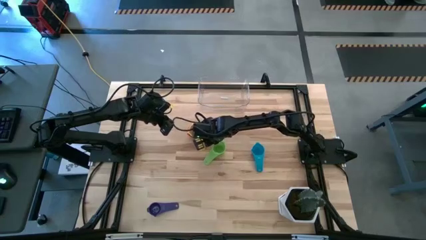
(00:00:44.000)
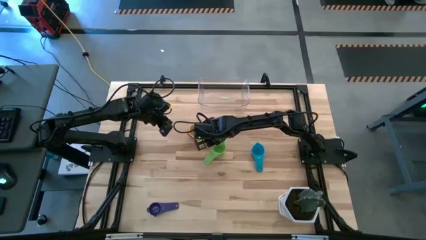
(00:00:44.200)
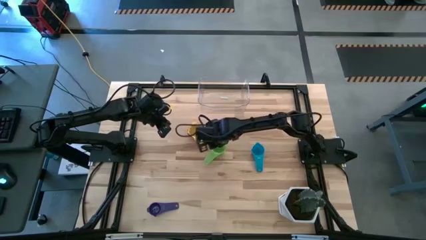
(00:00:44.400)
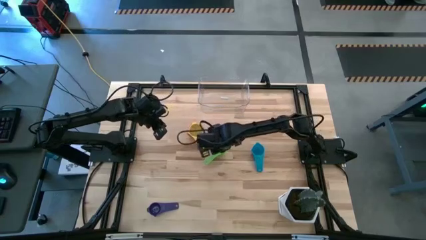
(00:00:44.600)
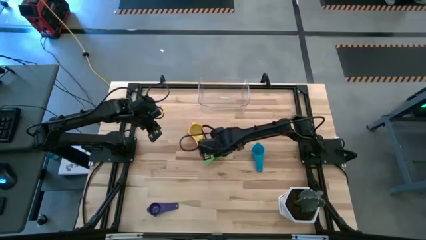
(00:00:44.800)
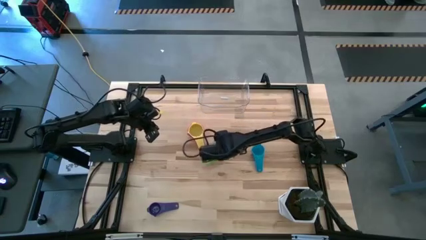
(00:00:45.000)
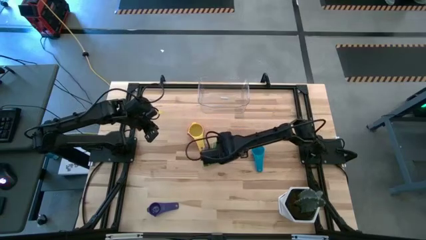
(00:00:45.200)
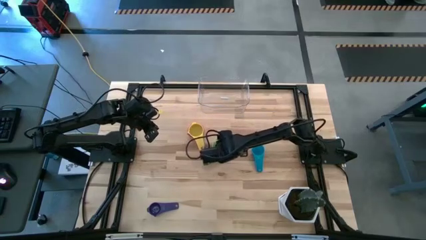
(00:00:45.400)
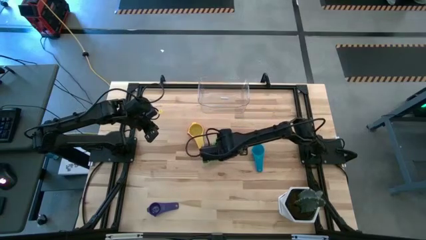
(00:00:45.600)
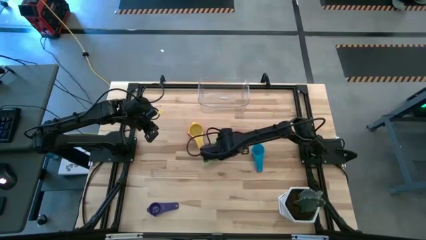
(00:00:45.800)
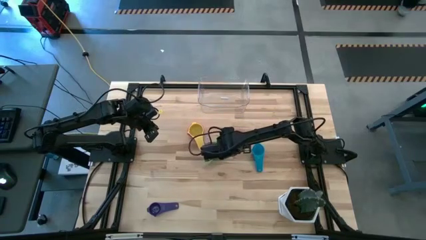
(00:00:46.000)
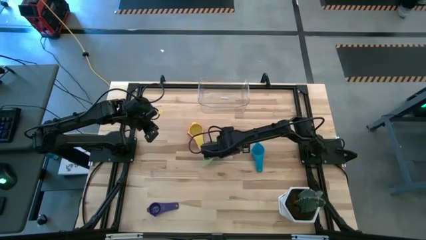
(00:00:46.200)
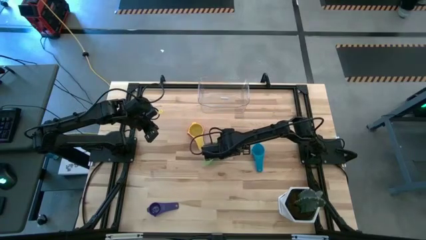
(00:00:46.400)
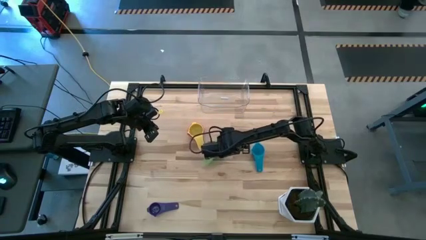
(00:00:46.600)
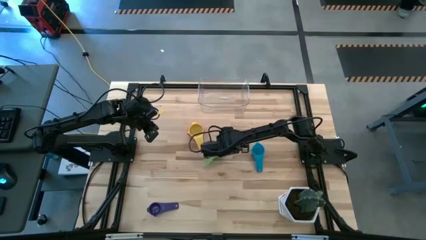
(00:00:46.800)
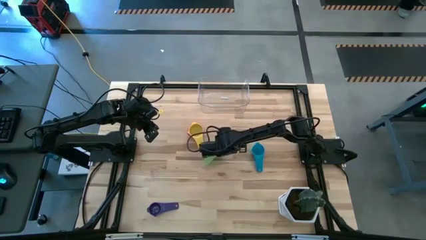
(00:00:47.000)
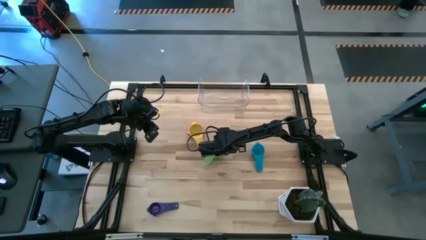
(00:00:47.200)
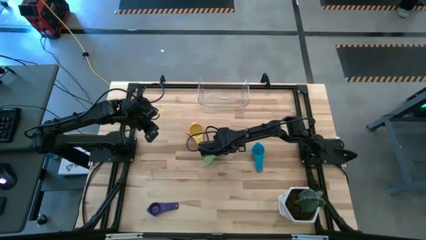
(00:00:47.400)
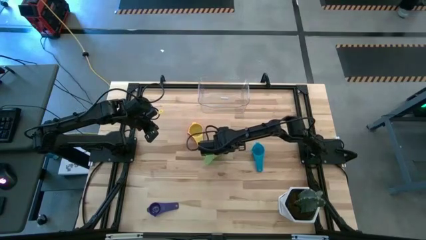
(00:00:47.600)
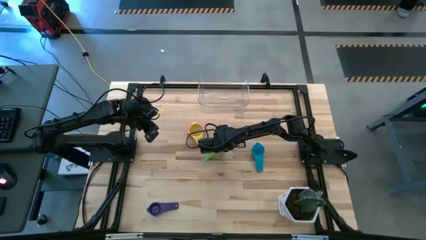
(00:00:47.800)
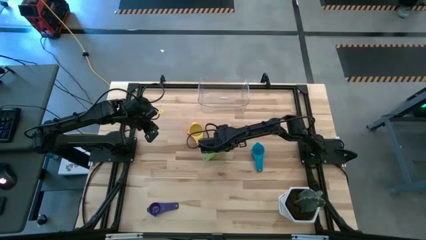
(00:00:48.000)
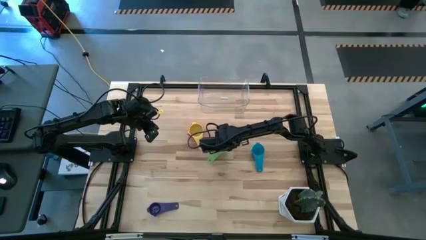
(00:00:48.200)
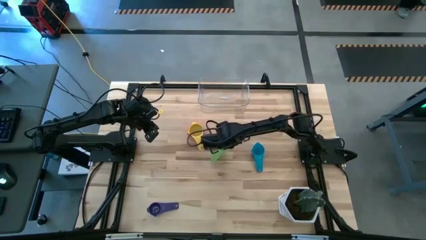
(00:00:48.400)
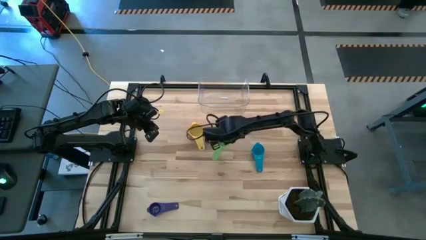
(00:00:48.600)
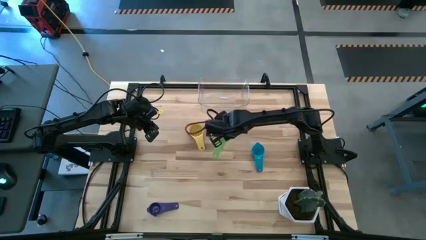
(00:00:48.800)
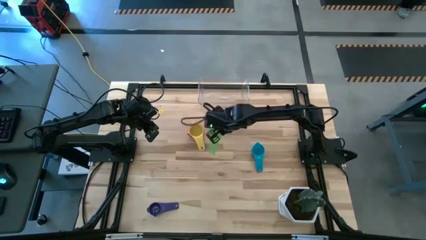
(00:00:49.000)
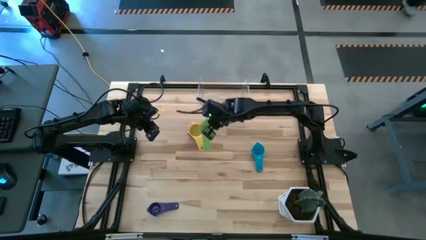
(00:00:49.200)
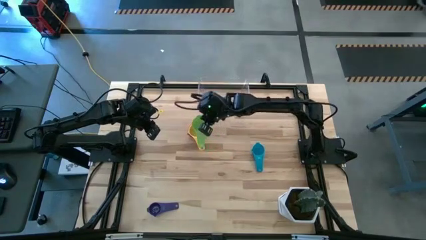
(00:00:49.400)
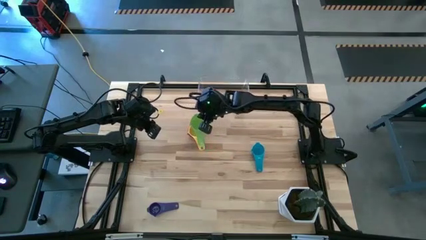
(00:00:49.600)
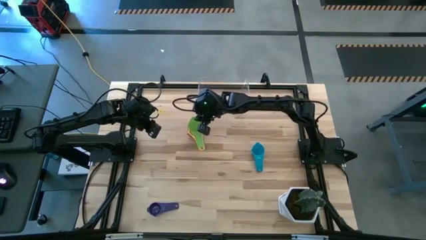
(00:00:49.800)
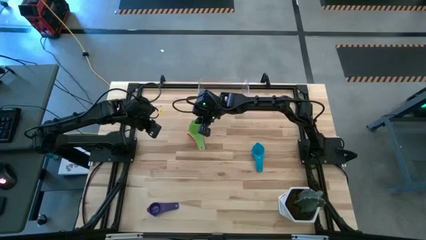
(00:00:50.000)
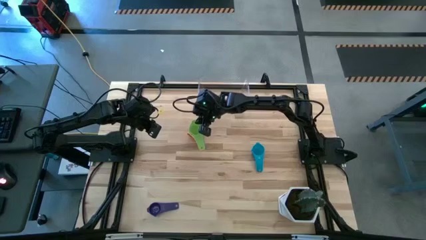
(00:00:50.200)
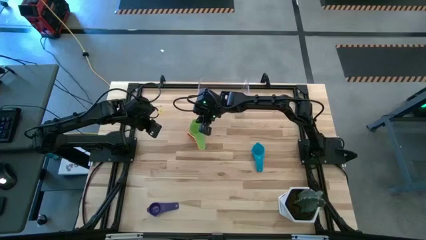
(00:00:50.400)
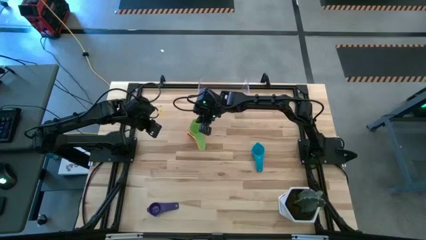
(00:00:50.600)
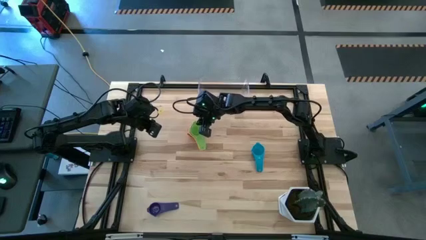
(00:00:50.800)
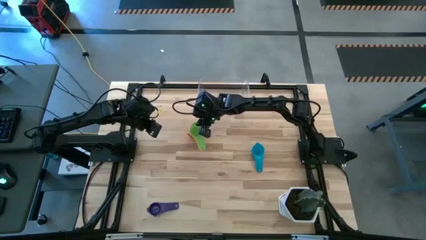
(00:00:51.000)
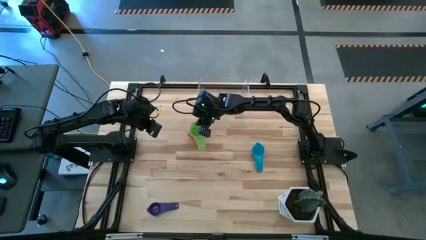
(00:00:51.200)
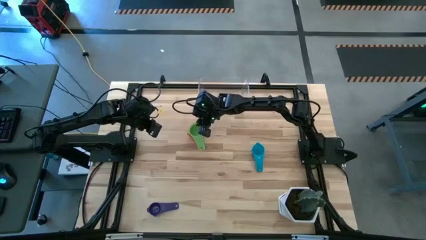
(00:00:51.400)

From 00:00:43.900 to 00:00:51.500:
Task: Nest measuring cups in basket
Stack the green measuring cup on top of the yellow measuring cup

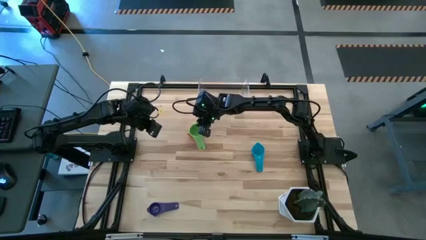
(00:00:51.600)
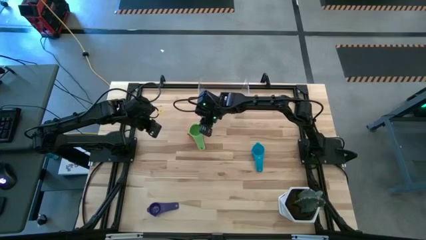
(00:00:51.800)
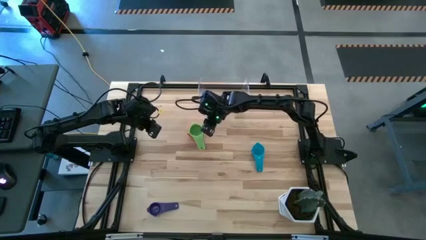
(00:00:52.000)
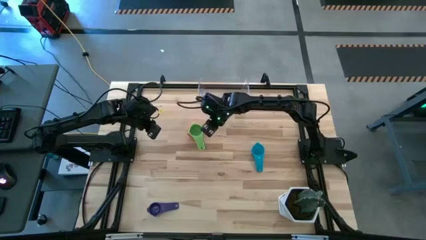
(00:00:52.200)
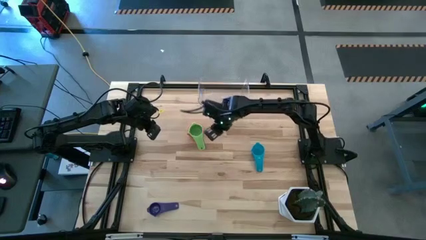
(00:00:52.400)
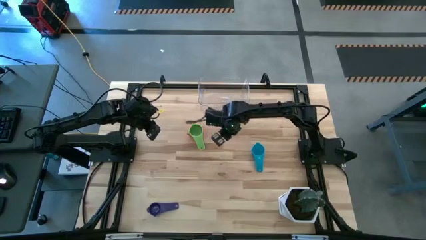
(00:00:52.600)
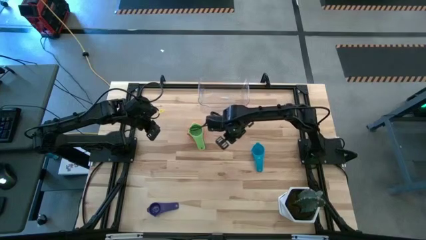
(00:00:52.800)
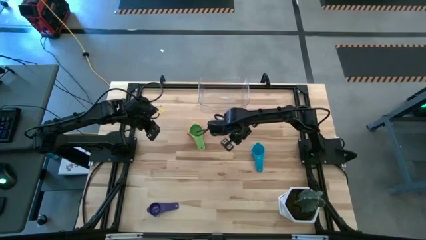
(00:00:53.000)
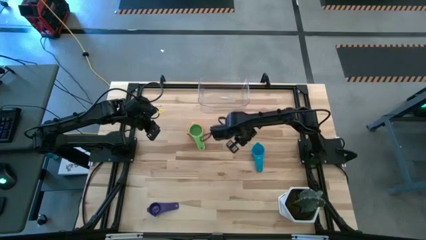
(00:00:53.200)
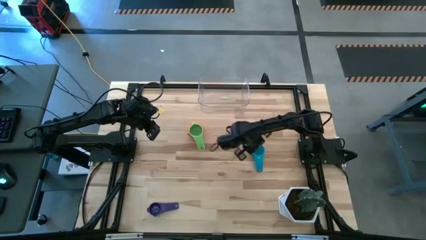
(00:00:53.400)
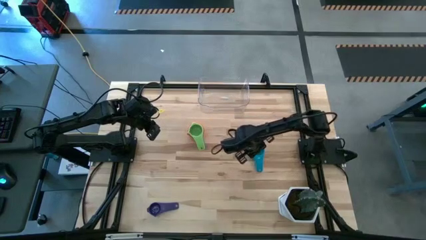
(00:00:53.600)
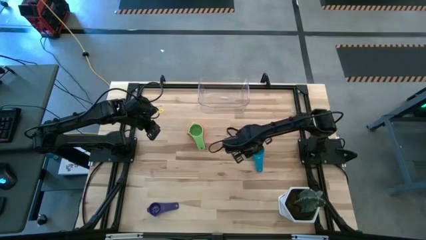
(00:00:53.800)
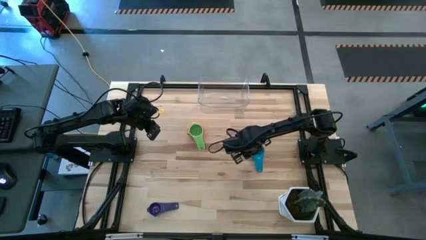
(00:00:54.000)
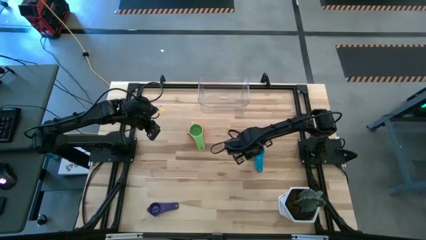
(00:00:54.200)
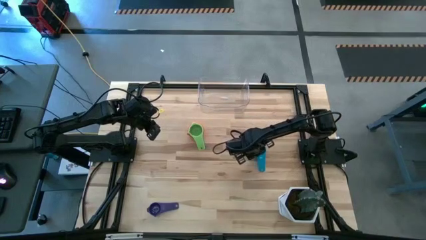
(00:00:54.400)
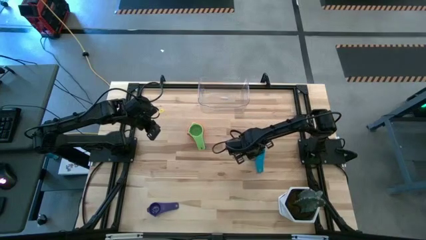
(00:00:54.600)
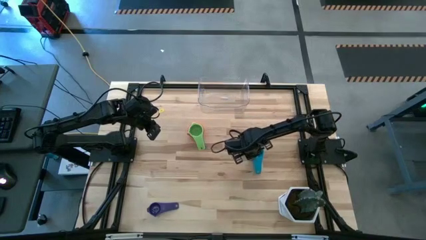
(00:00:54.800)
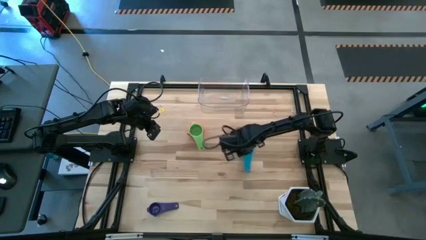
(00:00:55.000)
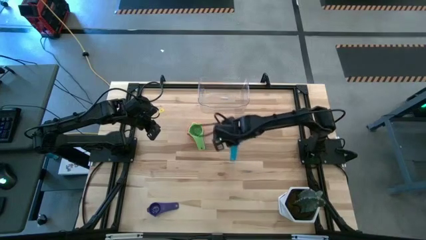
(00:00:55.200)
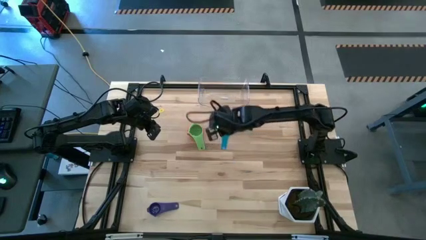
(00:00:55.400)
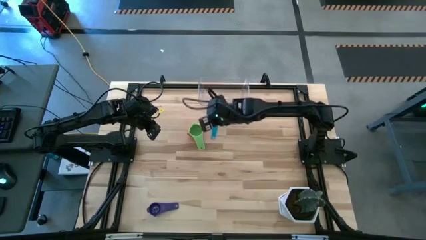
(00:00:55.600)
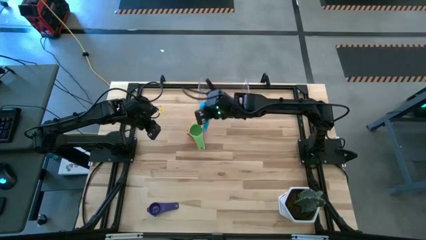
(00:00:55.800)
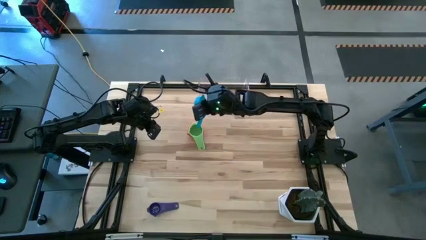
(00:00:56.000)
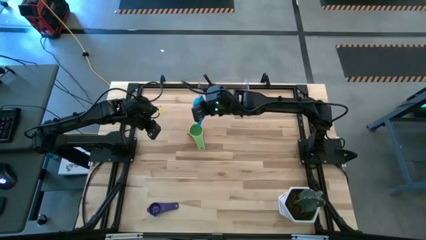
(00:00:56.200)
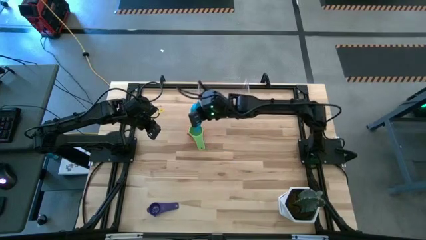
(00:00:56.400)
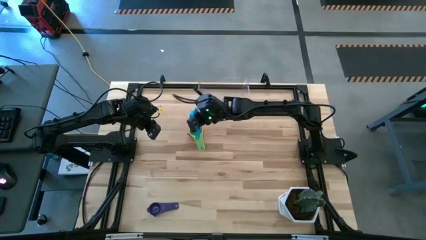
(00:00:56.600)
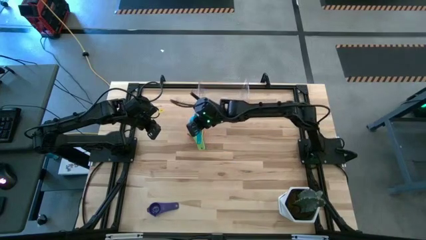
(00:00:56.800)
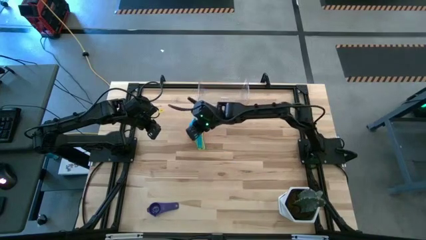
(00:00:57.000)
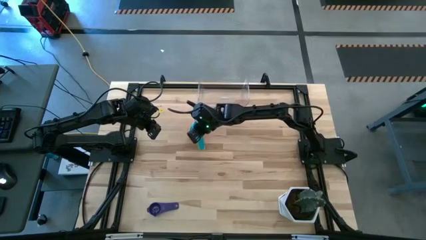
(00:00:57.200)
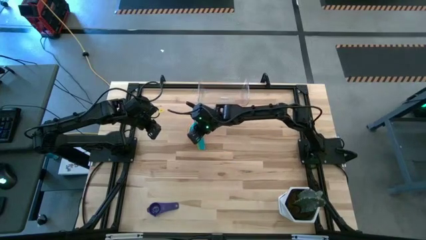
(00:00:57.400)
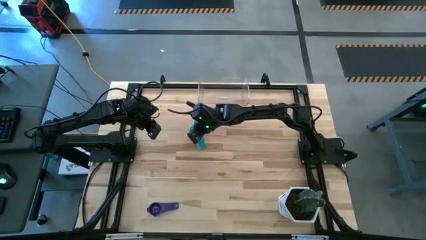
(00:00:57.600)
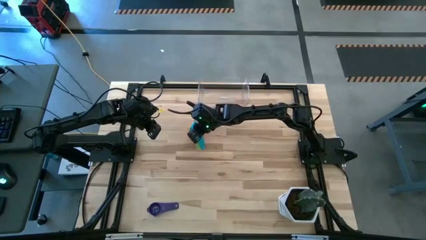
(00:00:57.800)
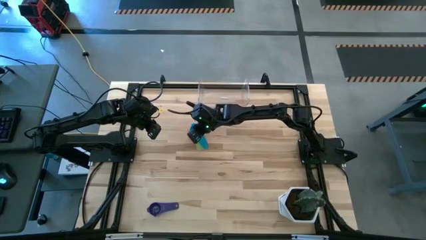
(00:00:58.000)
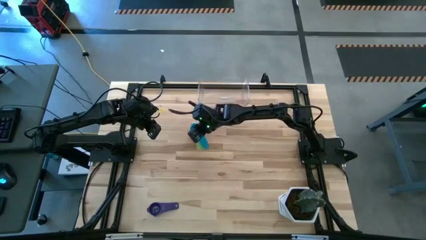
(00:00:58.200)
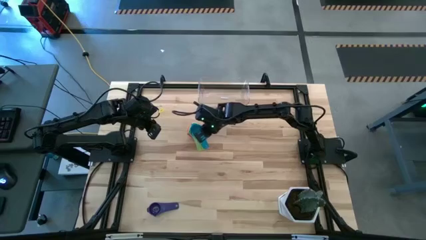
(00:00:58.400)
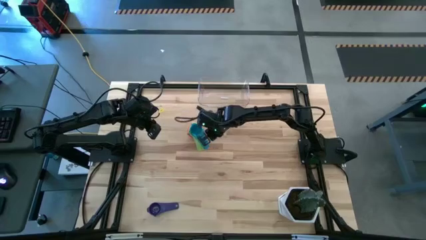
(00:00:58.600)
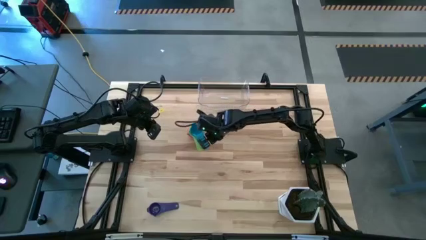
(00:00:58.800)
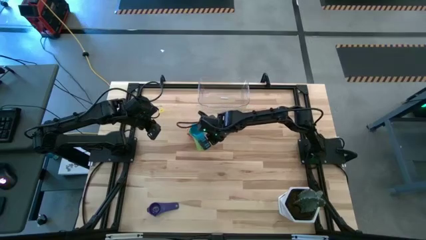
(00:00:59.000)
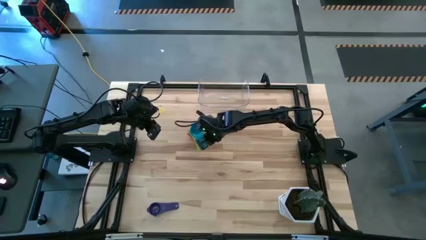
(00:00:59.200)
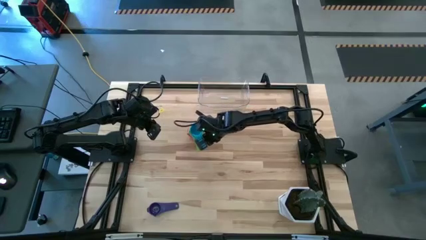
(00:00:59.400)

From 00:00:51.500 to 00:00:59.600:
Stack the light blue measuring cup on top of the green measuring cup

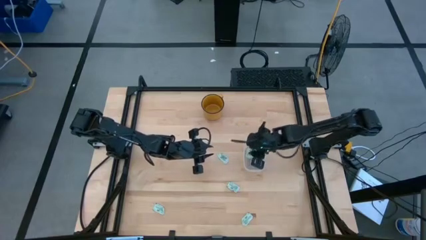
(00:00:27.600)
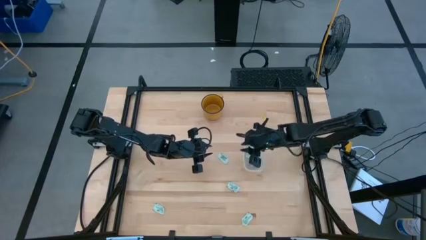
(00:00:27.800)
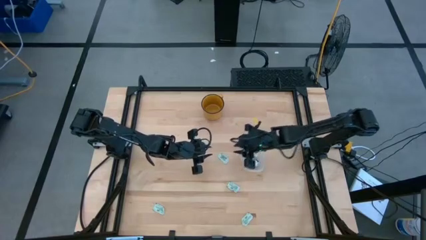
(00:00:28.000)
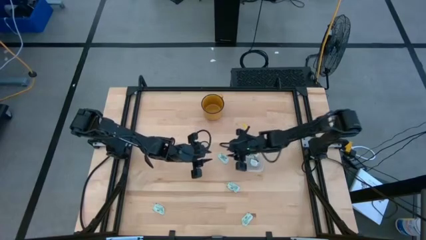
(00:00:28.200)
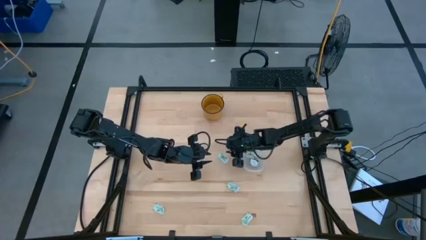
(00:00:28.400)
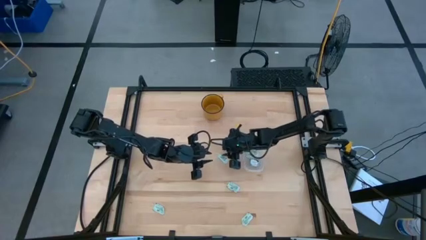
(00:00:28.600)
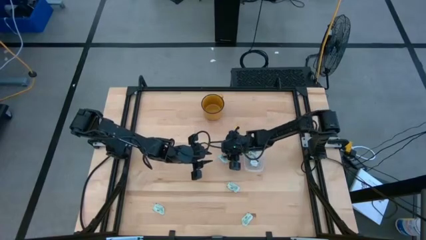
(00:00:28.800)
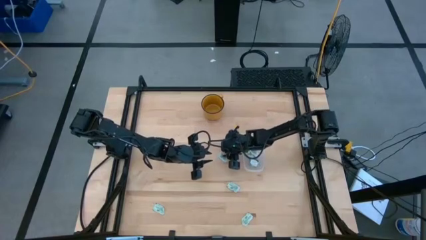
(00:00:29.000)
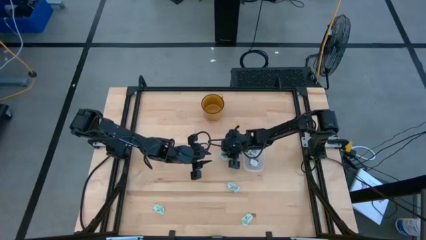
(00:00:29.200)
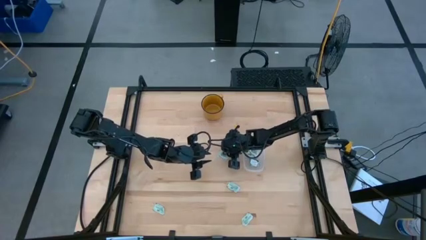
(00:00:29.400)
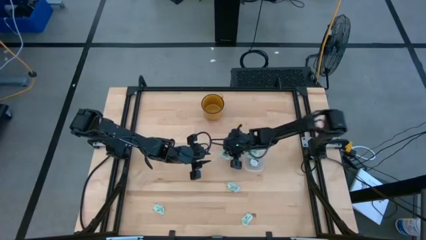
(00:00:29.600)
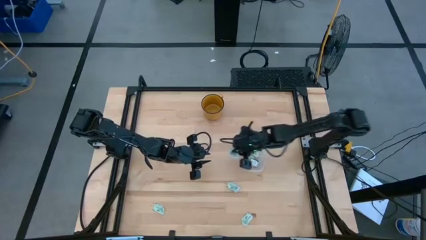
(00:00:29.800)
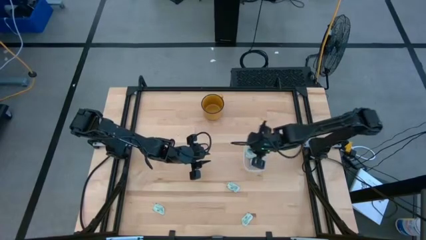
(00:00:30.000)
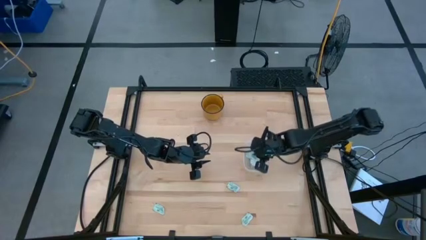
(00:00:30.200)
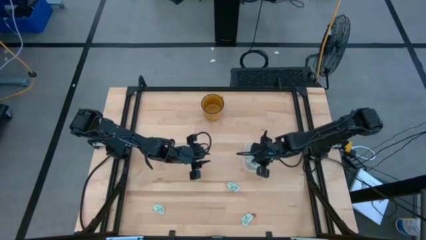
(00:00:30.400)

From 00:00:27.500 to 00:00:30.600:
Task: Pick and place Stevia / Truvia into bins
Put the white stevia packet into the transparent bin
